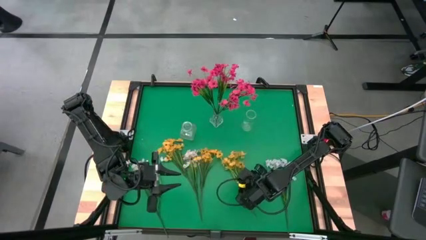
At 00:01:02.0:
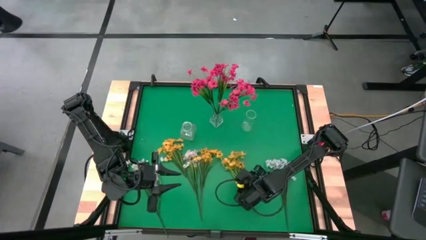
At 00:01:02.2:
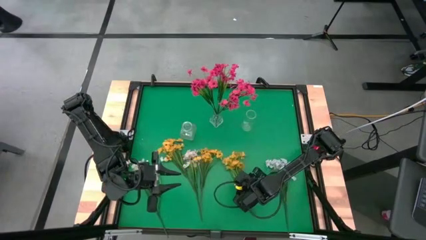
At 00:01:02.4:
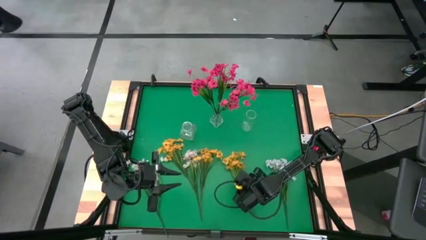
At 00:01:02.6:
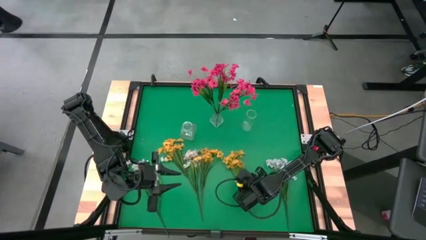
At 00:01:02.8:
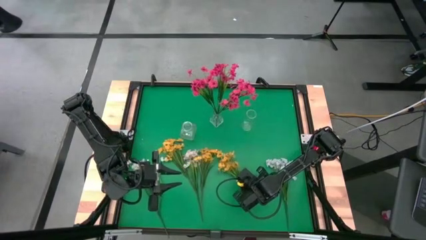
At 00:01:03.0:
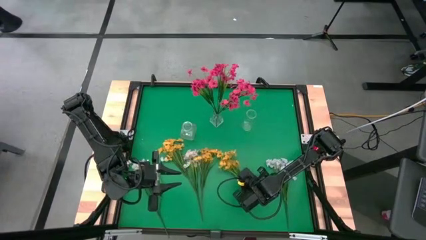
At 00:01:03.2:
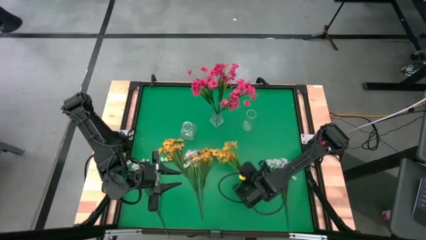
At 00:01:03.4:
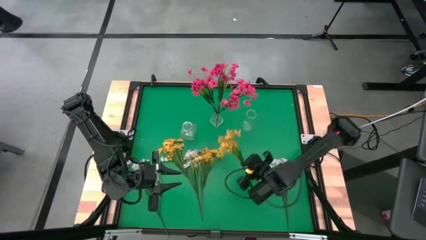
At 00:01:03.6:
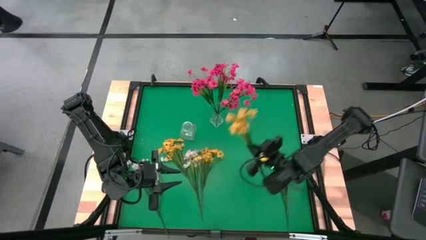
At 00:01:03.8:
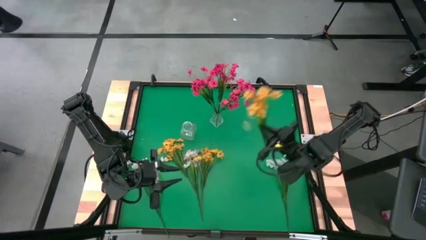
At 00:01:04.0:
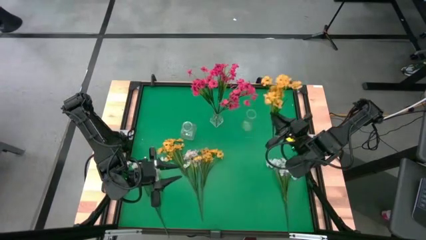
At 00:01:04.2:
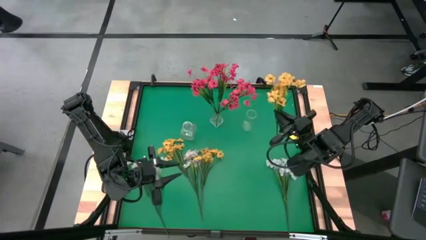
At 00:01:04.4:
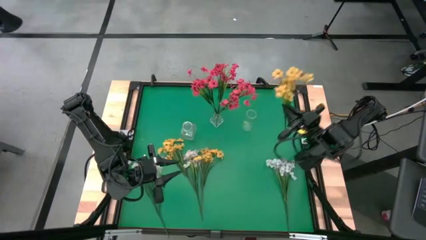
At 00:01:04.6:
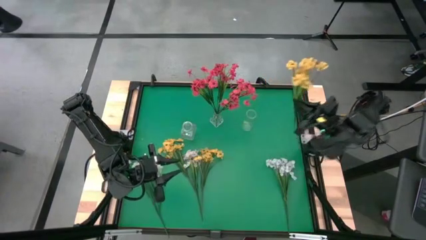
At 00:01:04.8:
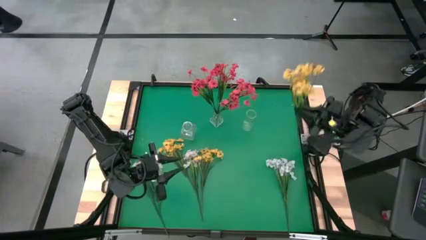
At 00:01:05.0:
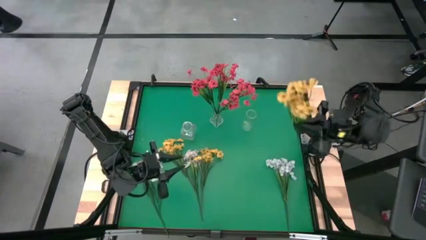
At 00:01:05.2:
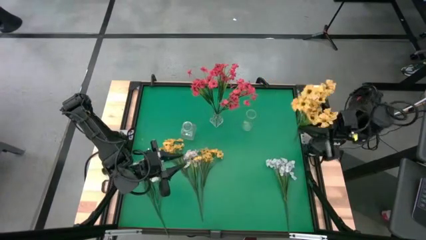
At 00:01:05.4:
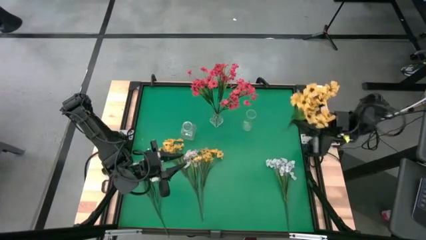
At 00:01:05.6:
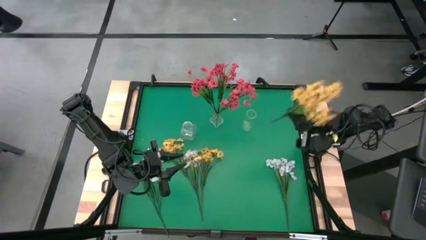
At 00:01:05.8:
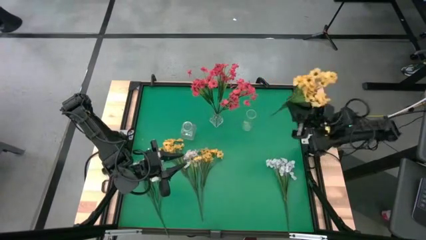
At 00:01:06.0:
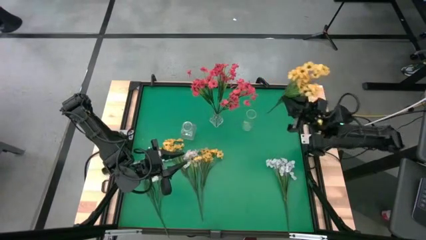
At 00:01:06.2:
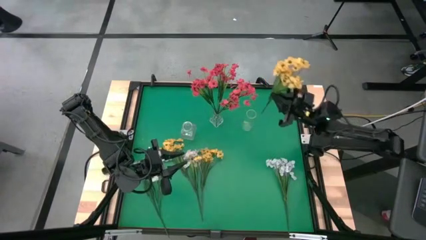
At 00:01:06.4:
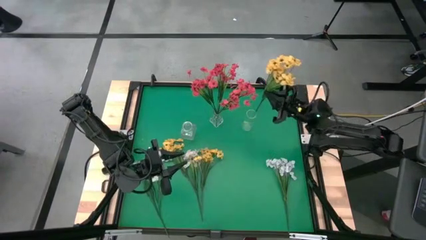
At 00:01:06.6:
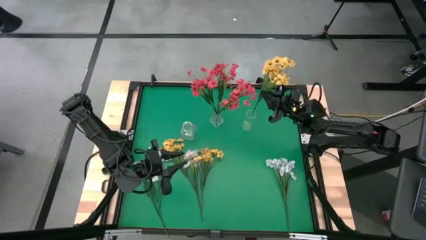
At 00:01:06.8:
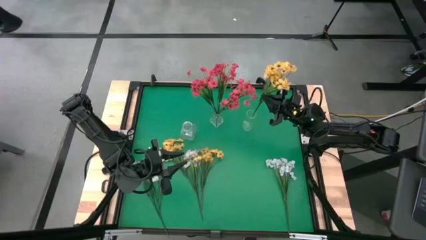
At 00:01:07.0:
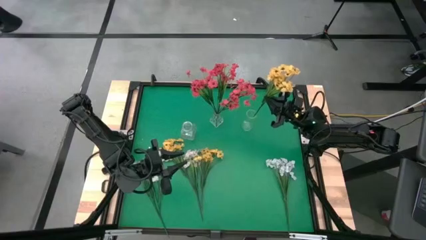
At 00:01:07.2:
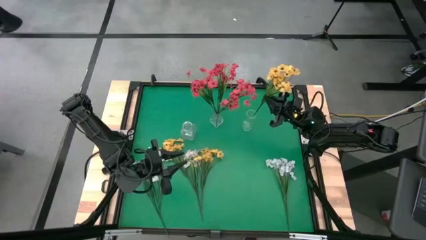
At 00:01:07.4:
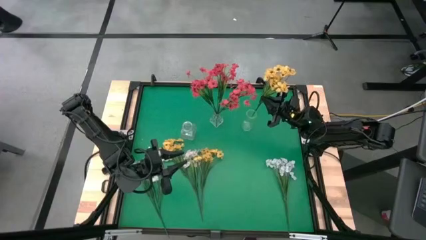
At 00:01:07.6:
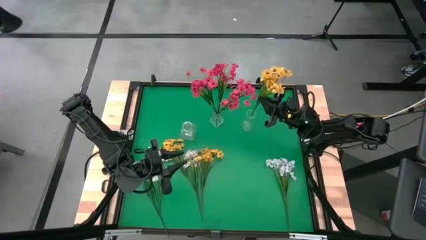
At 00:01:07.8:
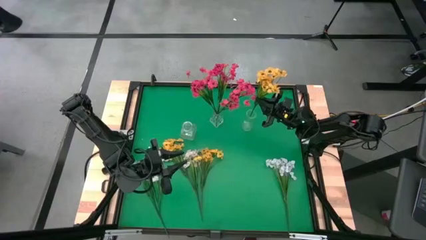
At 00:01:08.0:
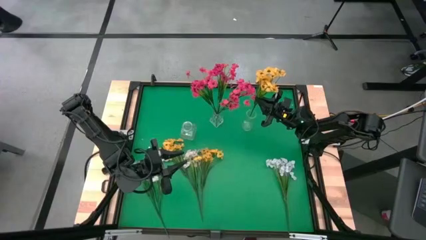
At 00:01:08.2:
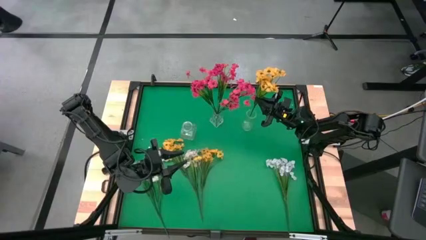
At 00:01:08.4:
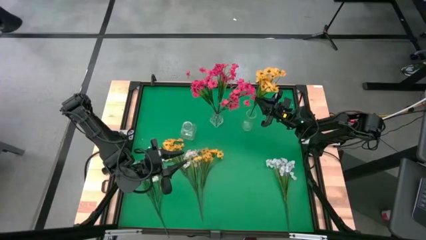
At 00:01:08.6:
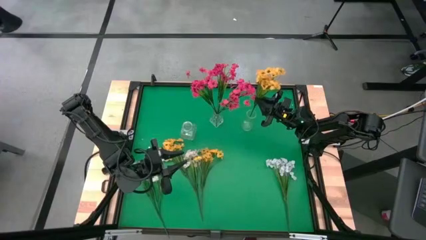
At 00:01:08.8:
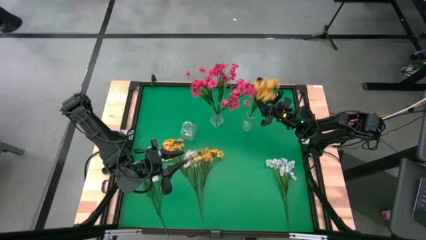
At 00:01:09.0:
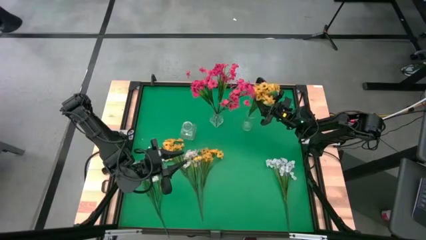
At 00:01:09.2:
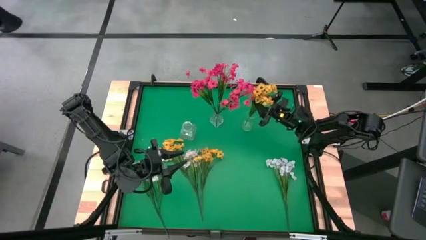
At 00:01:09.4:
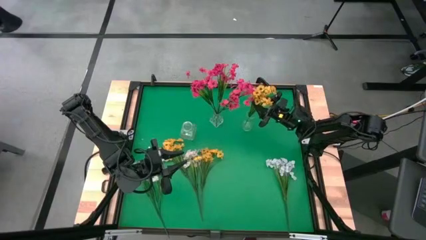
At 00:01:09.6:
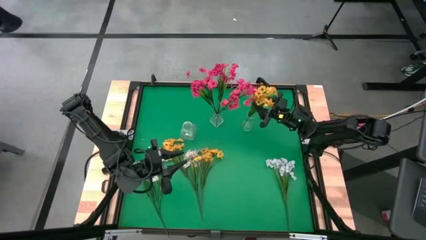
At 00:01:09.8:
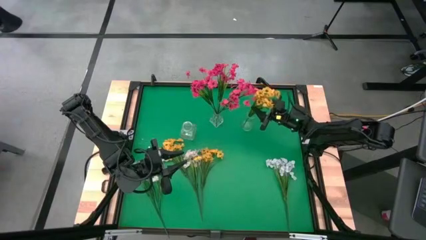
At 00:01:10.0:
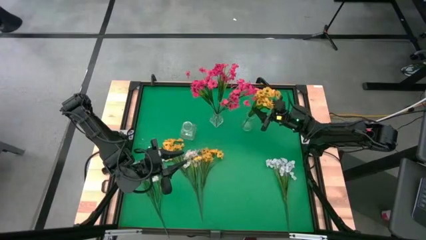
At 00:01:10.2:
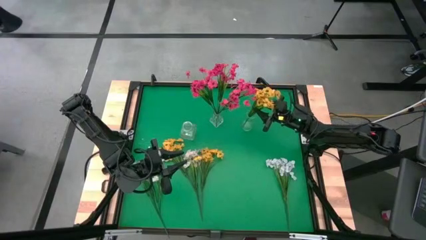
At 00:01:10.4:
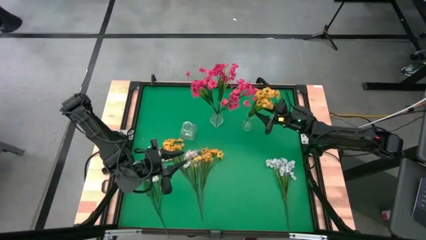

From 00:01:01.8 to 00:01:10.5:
Task: Sort flowers into vase by color
Put the right yellow flower into the right transparent vase

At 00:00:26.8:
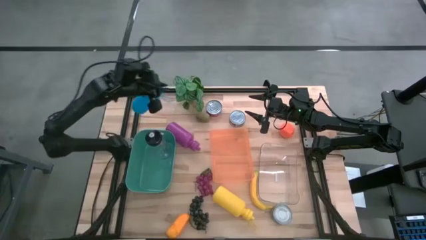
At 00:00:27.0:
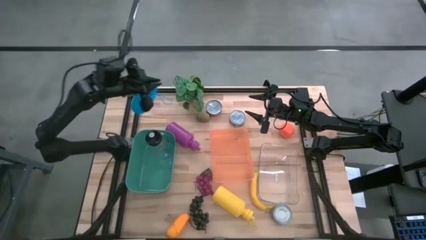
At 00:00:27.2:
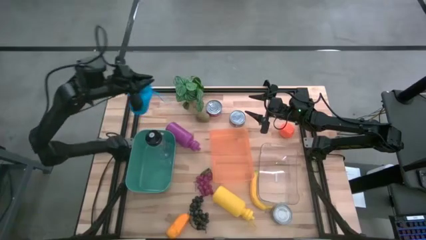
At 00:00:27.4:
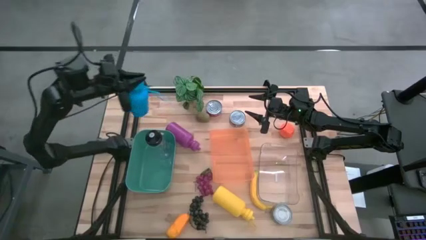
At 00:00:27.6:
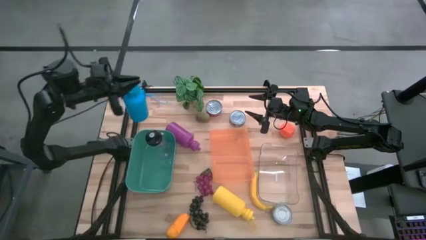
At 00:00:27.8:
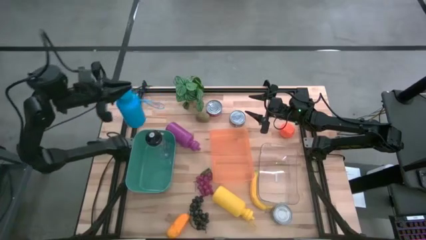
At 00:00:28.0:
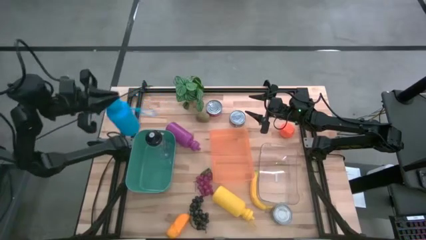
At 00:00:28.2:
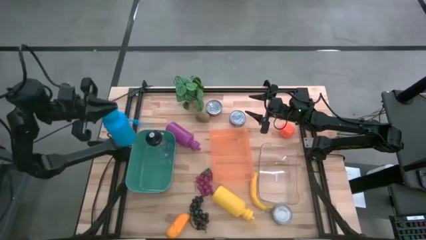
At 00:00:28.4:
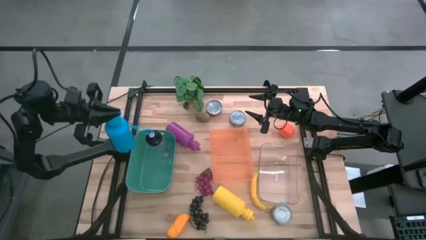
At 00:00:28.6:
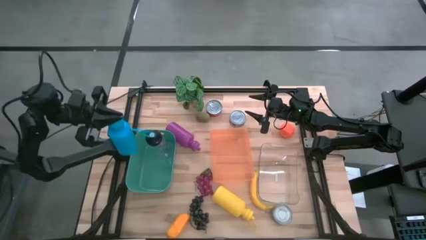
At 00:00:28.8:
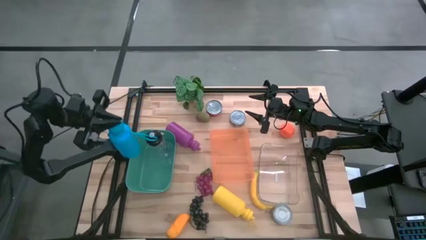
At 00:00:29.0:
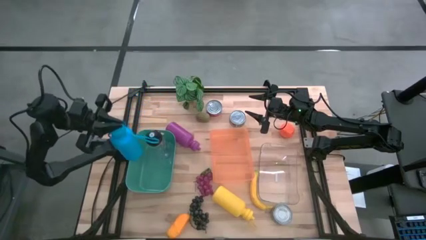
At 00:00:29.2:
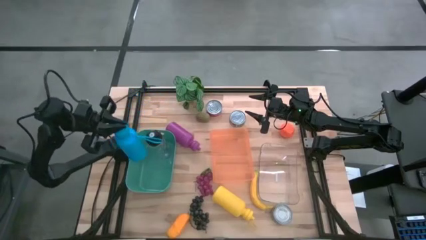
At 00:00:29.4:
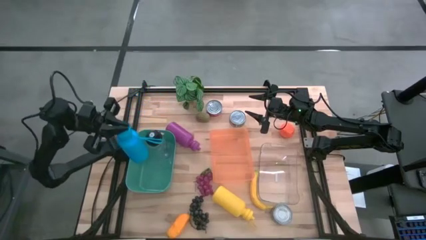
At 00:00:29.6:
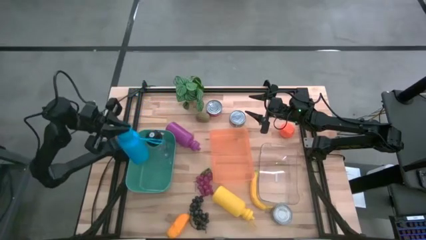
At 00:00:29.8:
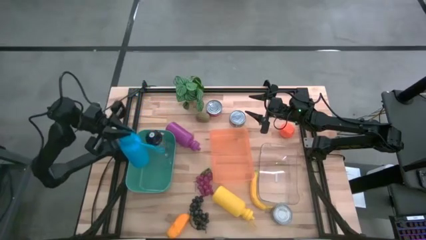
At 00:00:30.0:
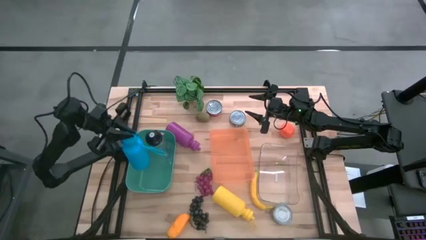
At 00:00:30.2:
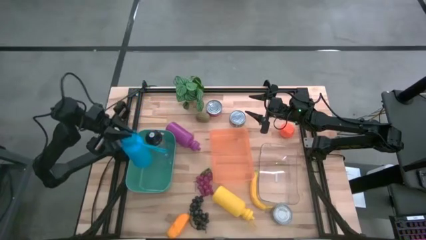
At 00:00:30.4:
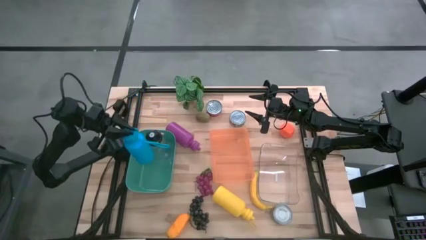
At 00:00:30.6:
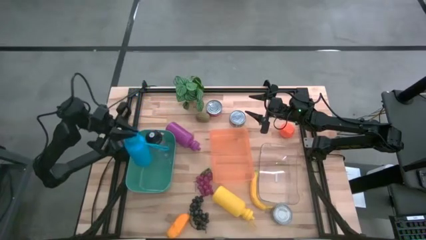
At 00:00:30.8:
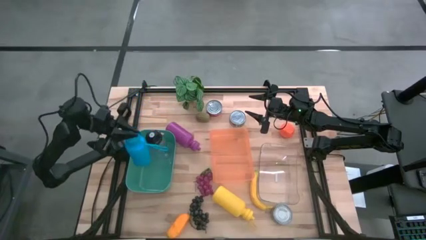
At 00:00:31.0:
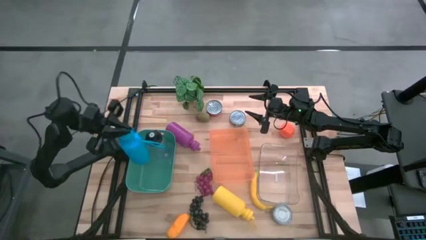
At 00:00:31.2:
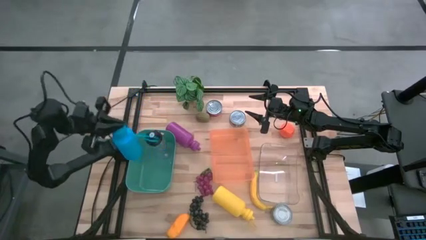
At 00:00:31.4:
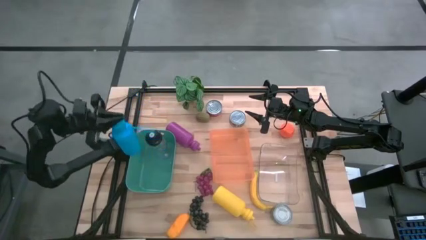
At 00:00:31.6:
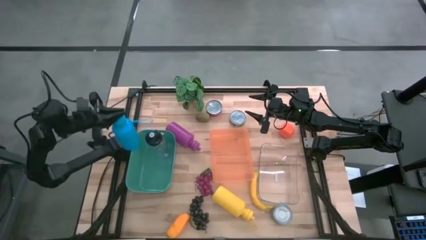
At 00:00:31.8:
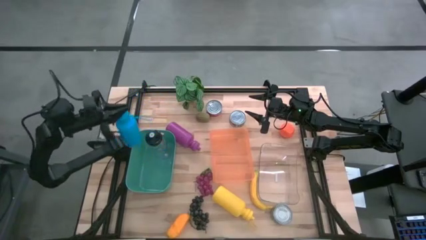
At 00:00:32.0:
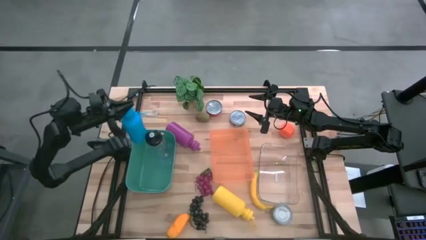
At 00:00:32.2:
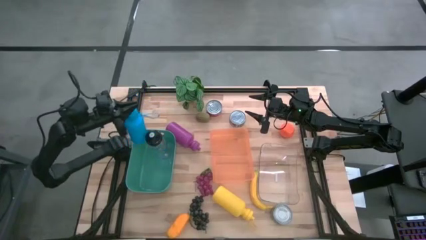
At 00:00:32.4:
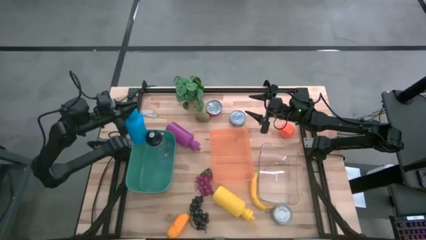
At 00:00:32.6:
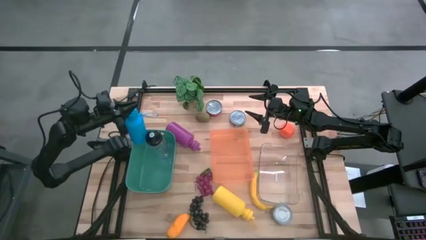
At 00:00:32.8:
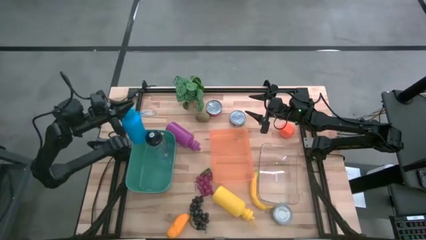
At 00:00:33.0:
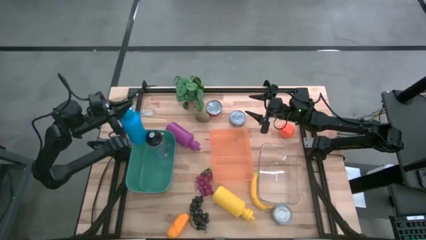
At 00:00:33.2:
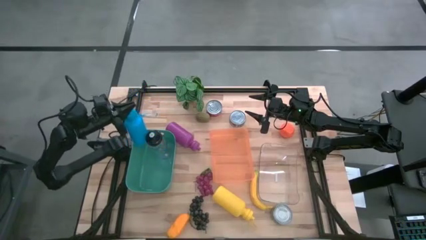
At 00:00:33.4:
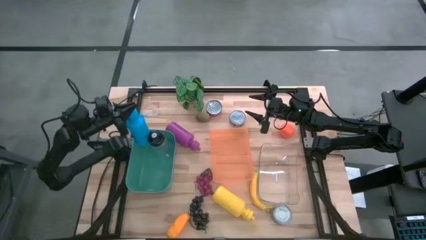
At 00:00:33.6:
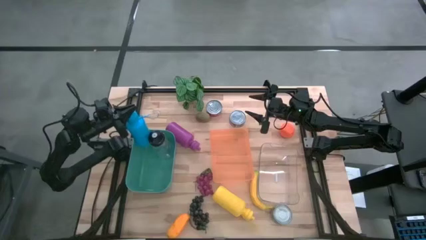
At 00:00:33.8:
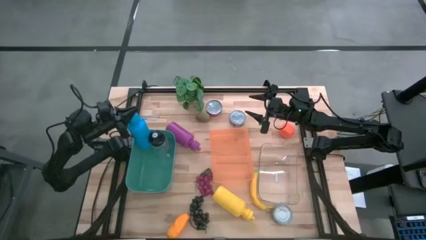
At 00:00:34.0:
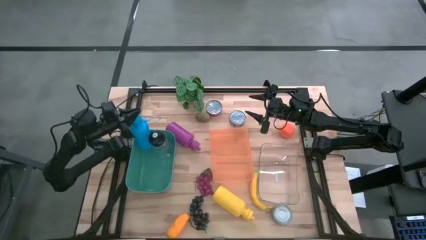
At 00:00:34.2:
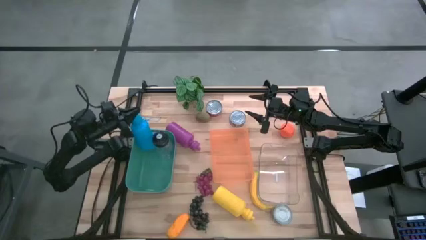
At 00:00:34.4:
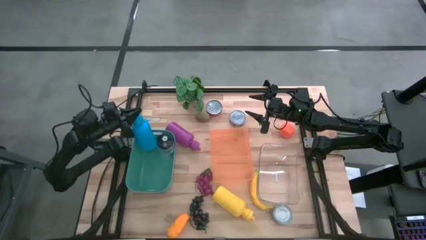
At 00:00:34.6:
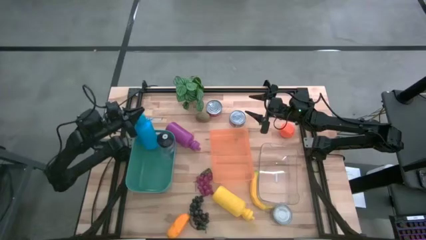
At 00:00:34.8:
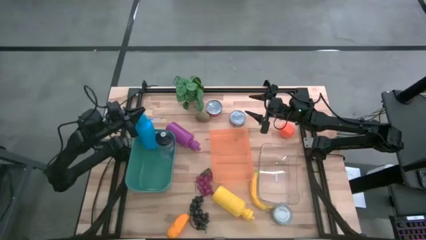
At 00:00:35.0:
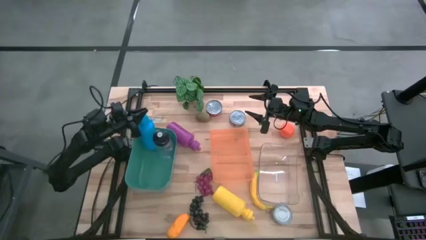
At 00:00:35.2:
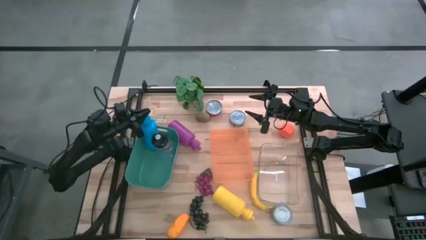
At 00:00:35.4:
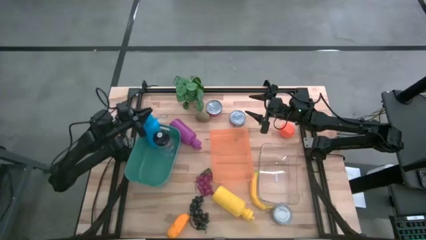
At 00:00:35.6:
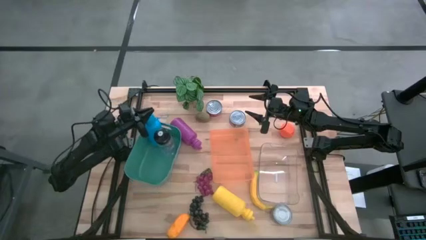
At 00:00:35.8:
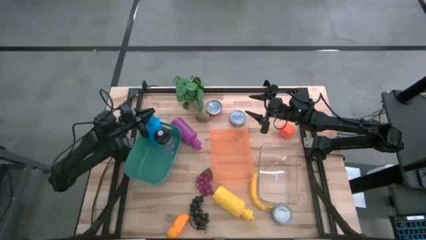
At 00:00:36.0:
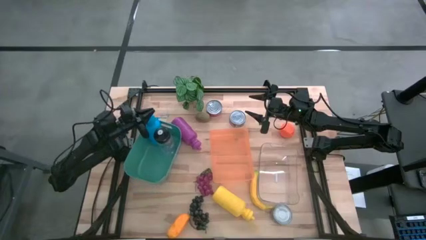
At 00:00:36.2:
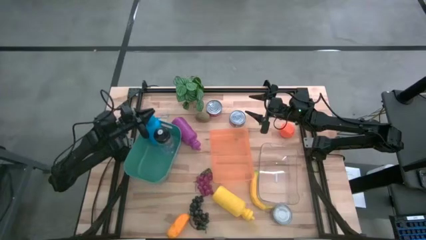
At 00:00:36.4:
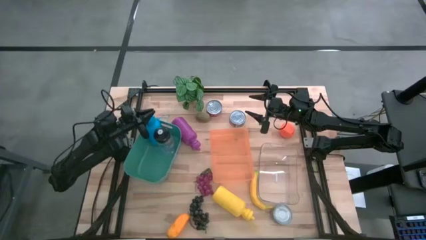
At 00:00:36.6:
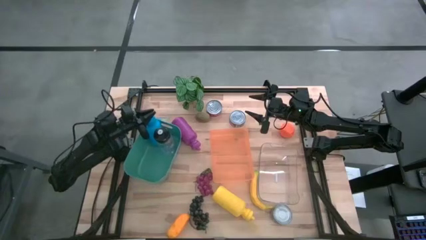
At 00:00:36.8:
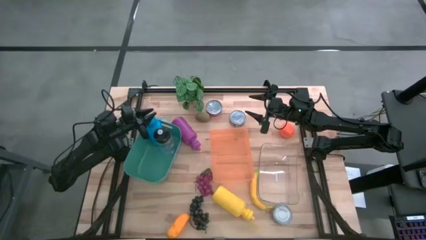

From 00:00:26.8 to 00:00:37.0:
Task: Pick & Place Food Item
Put the blue water bottle into the green bin
